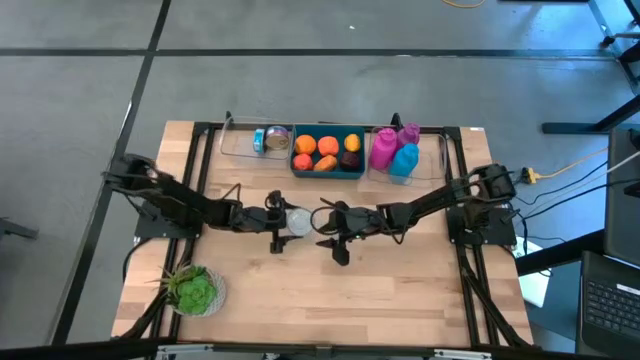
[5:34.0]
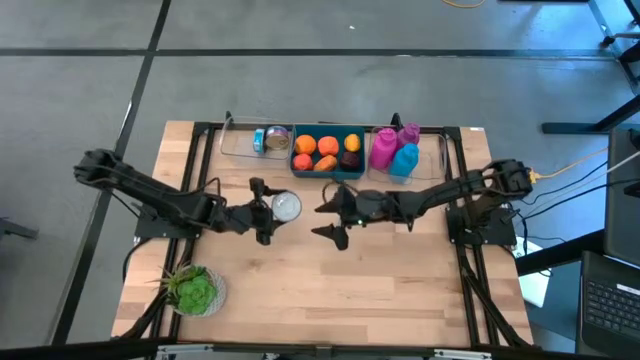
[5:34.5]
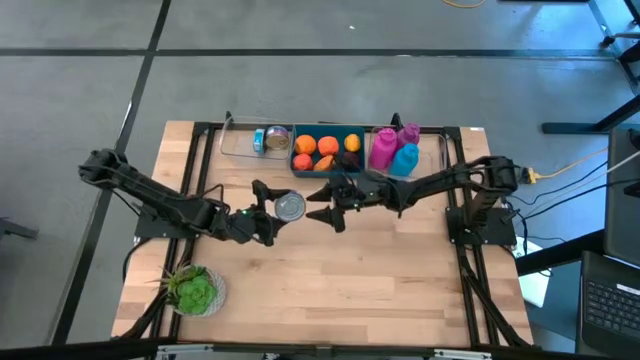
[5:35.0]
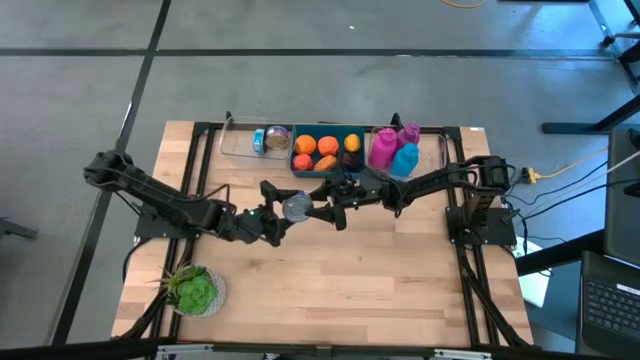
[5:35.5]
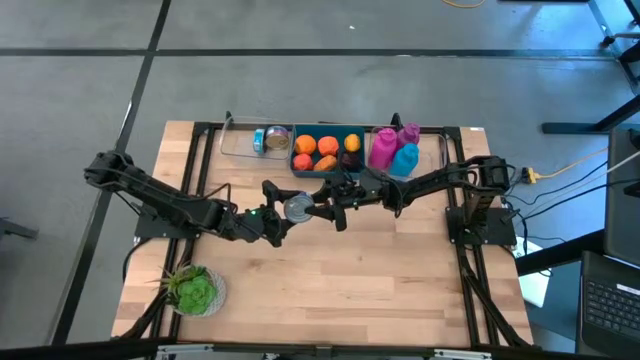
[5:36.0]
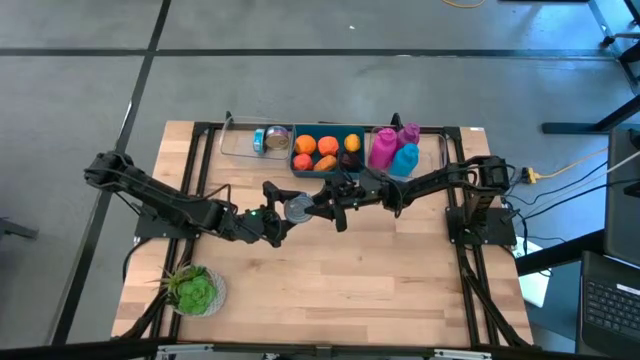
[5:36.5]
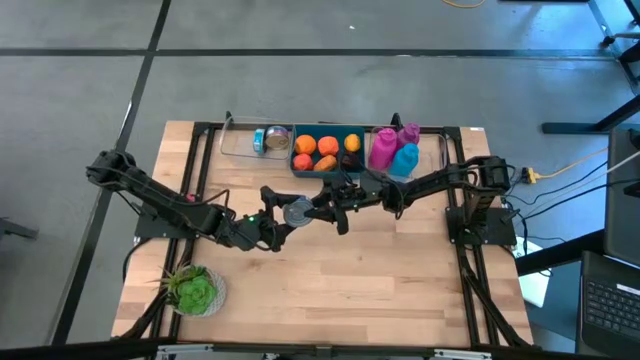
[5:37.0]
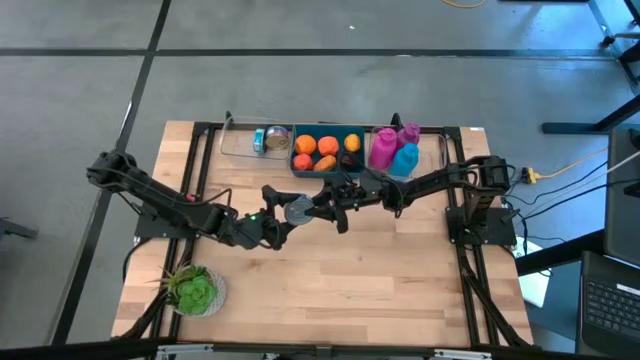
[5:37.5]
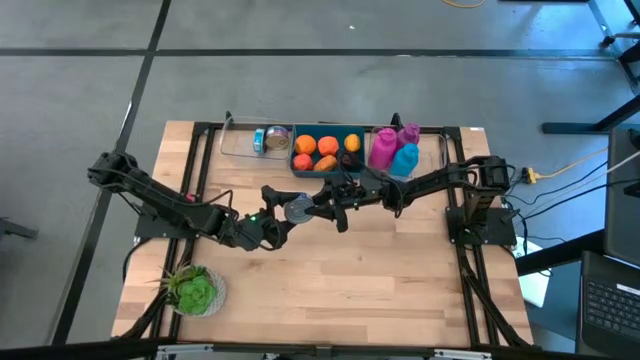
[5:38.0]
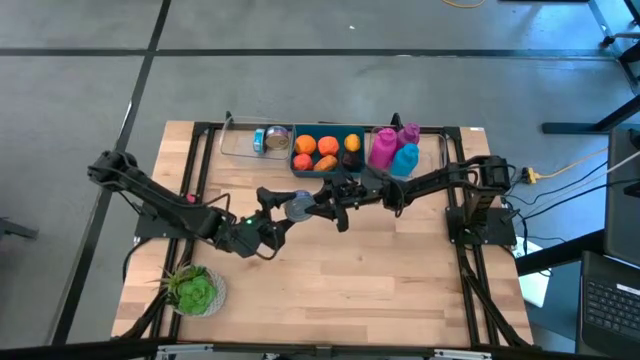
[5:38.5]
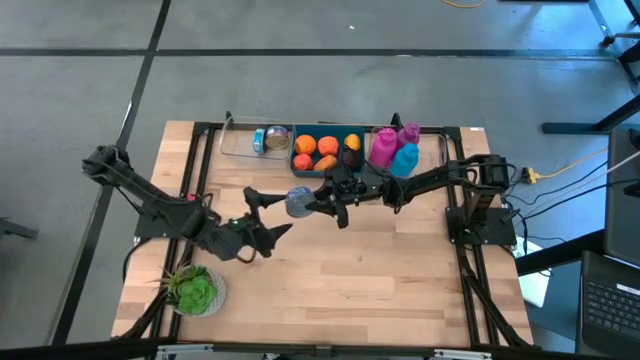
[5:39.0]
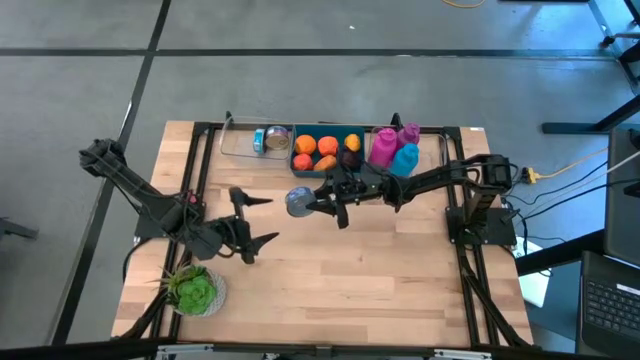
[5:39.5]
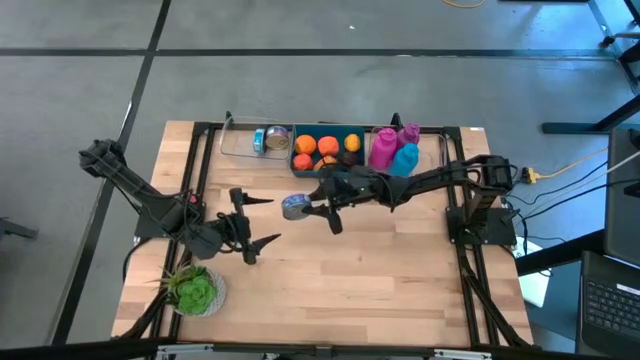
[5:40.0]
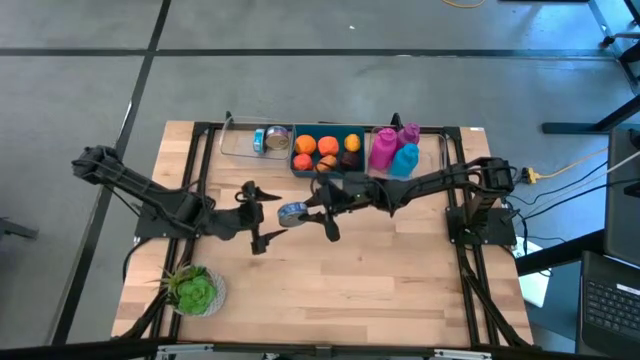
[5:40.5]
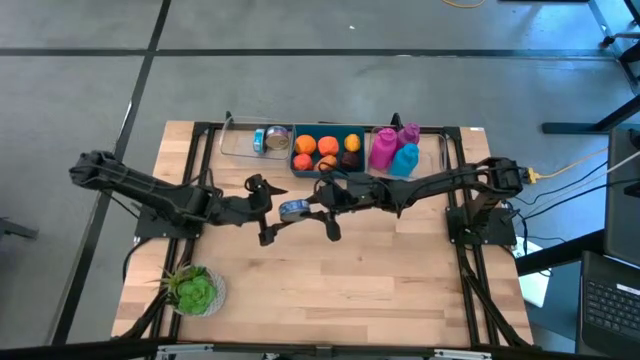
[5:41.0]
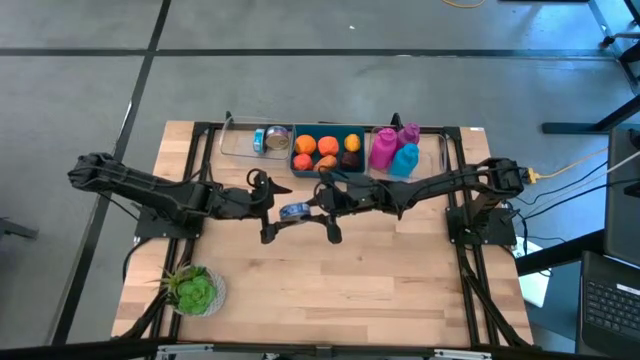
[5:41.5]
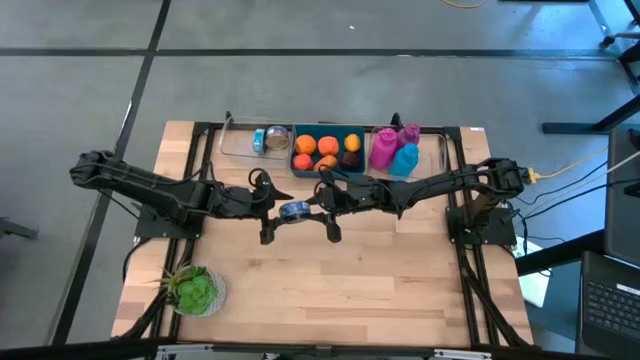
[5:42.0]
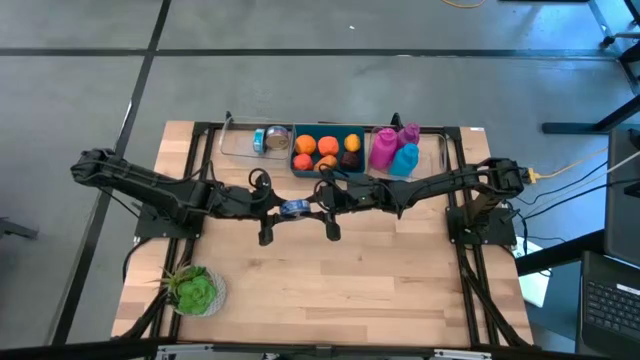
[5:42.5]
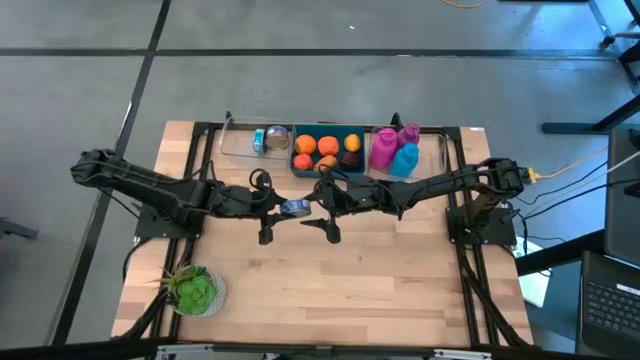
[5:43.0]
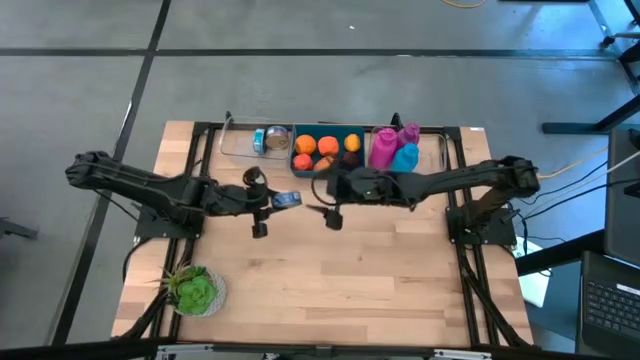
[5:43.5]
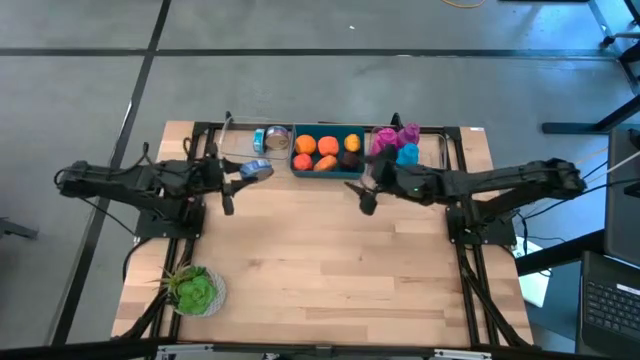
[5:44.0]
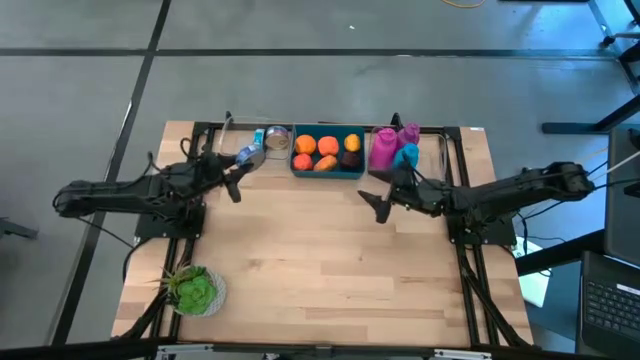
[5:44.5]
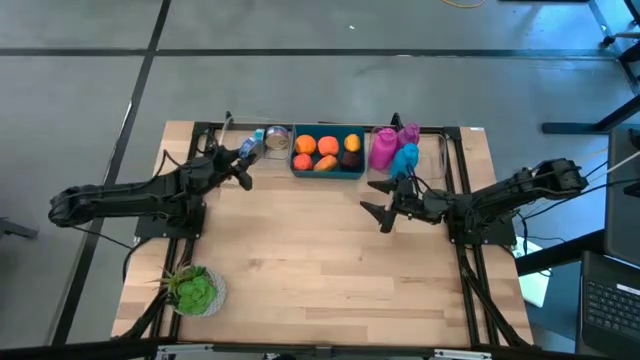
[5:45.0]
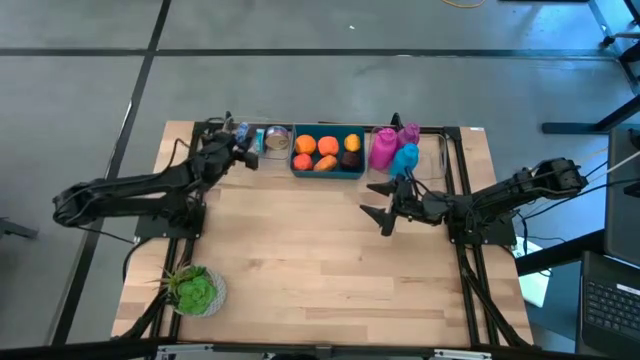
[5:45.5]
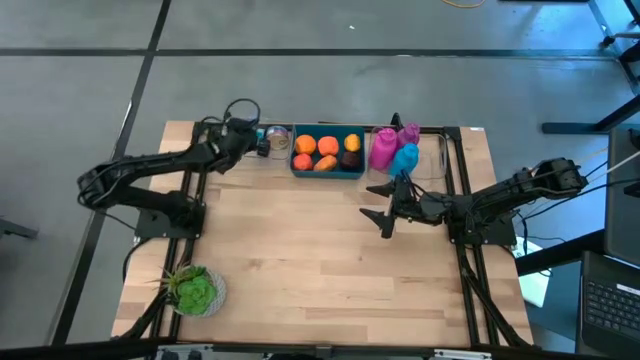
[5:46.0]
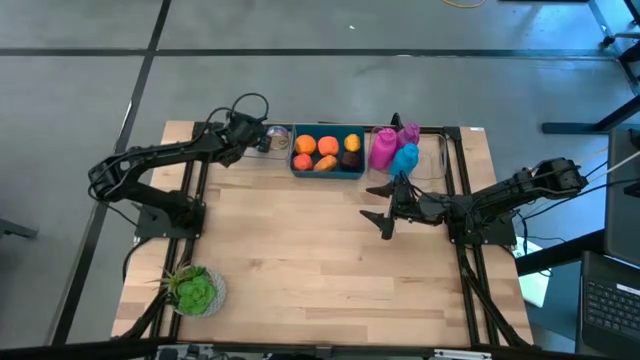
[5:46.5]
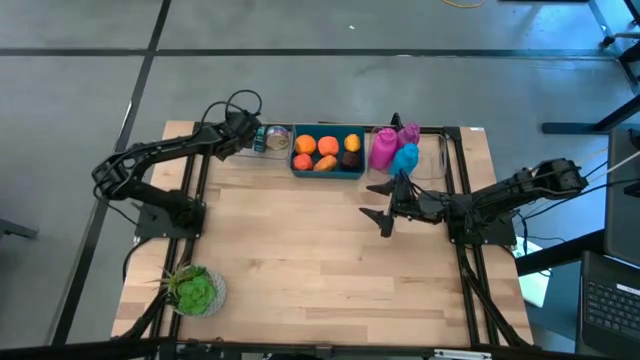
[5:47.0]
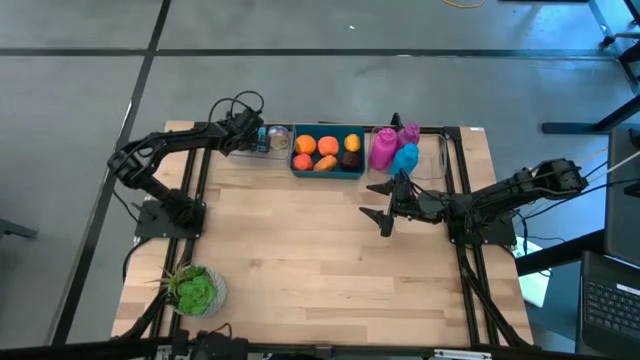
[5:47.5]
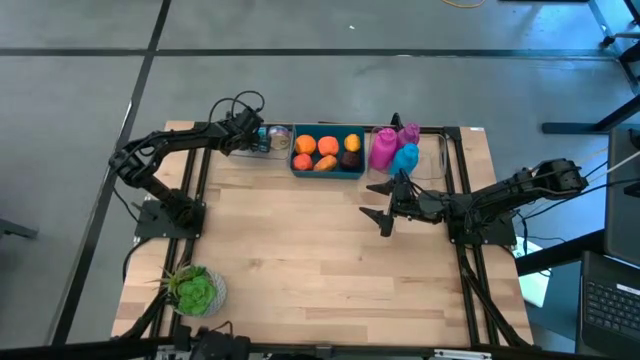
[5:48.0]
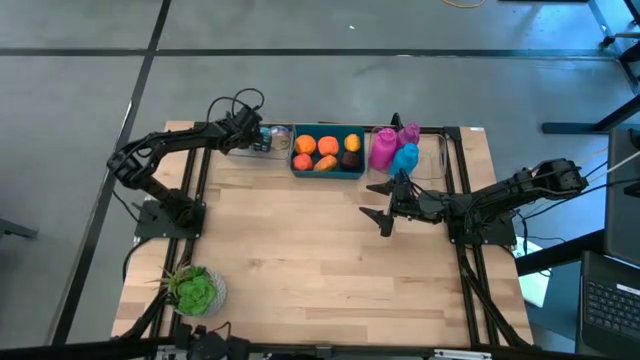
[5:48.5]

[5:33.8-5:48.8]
Task: Pick & Place Food Item
Put the blue tuna can into the left transparent bin

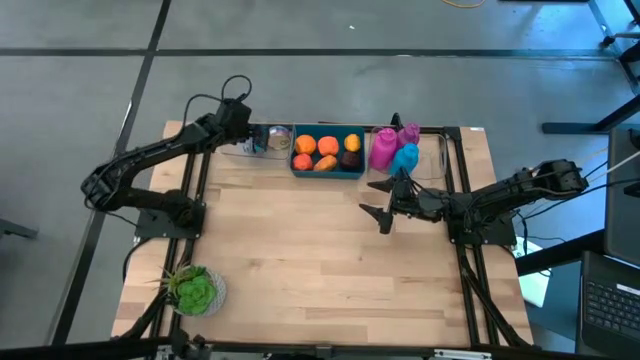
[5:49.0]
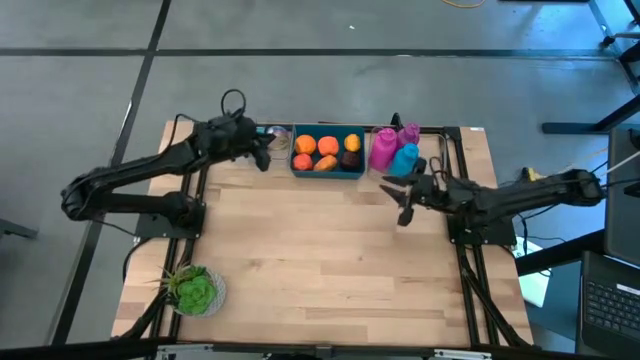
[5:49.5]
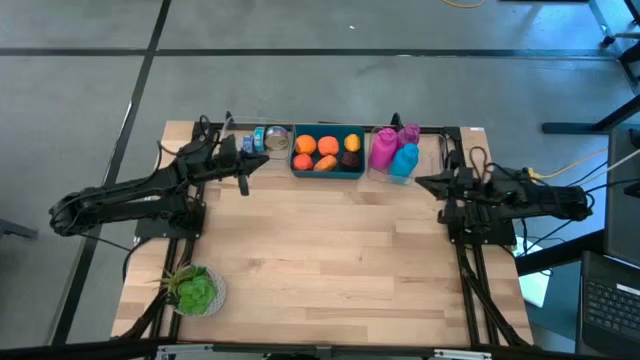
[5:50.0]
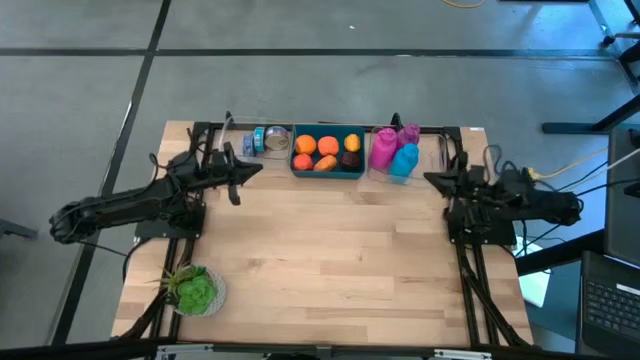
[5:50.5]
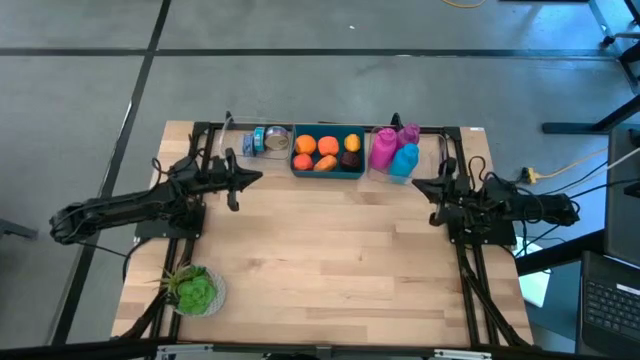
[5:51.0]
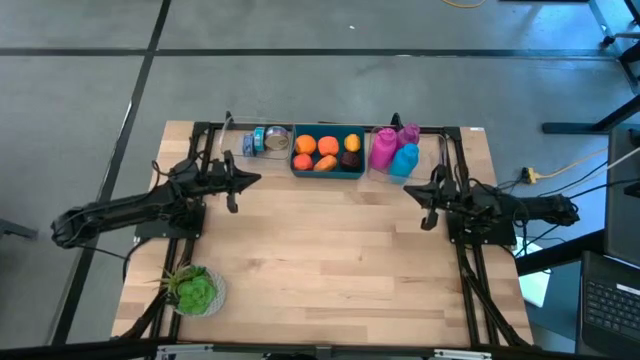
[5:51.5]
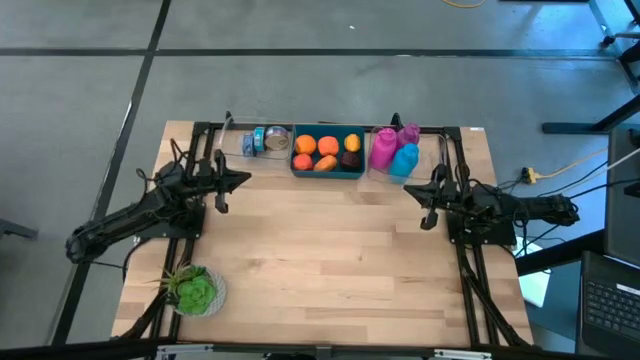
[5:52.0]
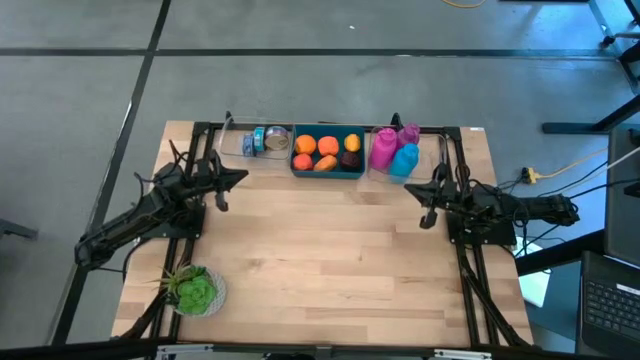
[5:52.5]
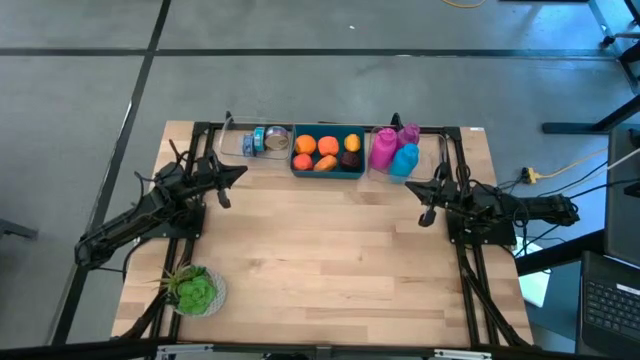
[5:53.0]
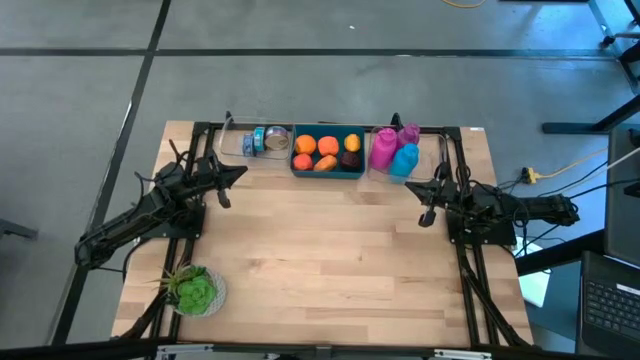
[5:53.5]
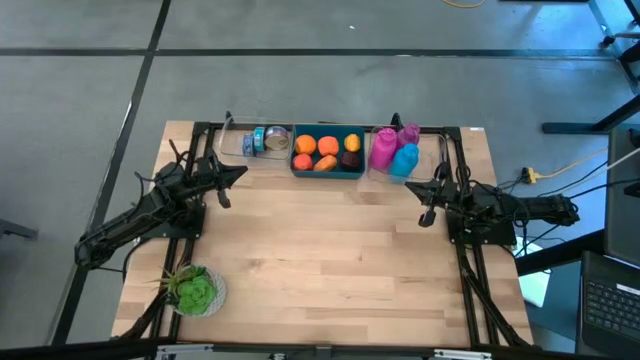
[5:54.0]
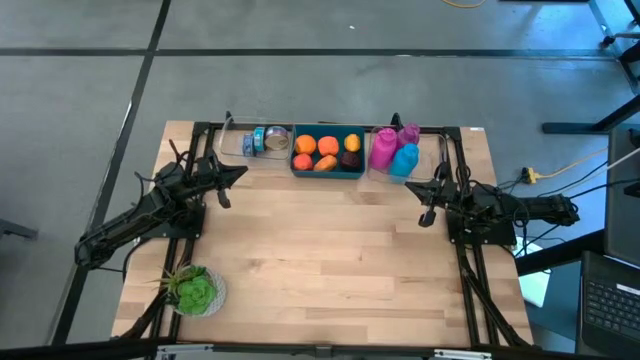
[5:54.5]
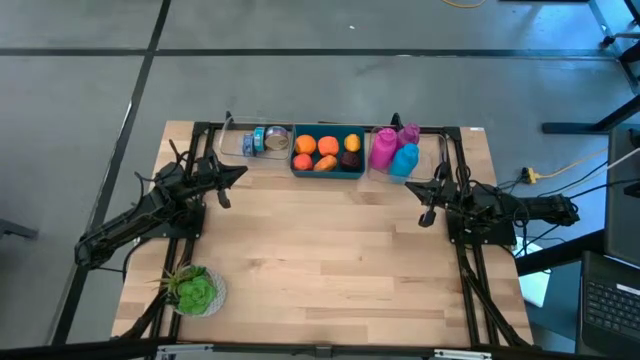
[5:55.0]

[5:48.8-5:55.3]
Return to Home Position
